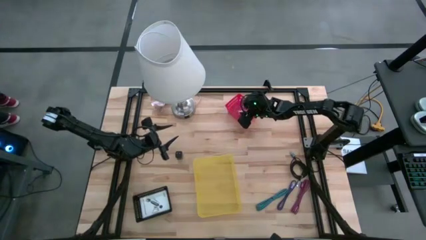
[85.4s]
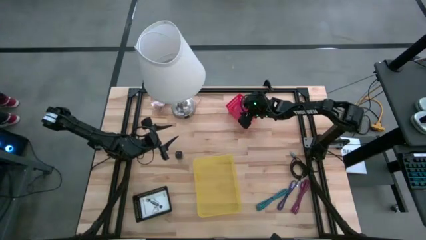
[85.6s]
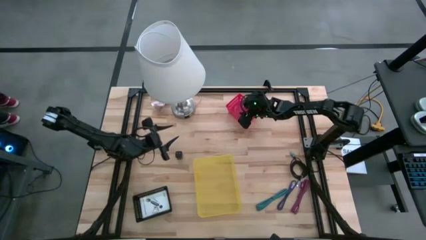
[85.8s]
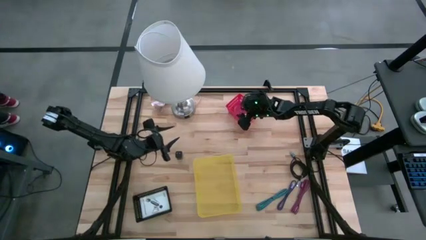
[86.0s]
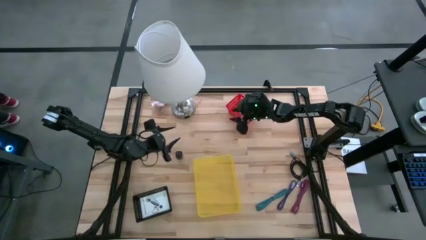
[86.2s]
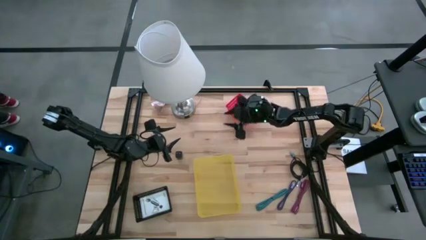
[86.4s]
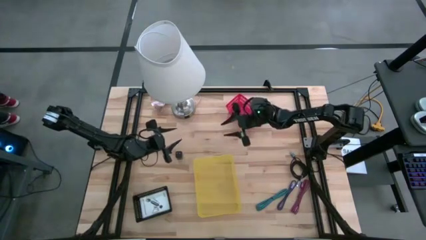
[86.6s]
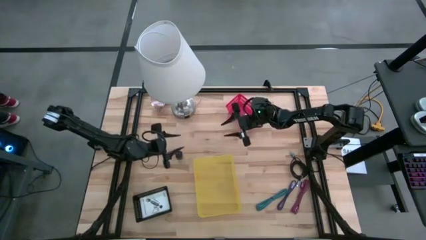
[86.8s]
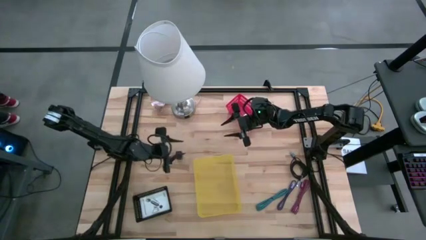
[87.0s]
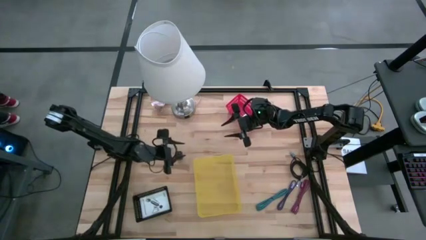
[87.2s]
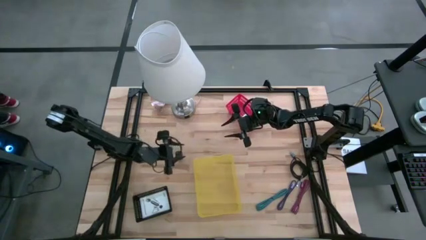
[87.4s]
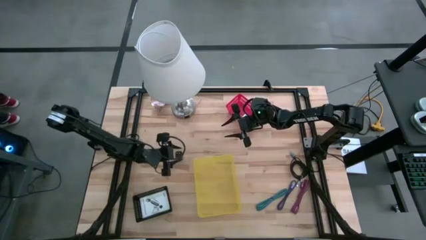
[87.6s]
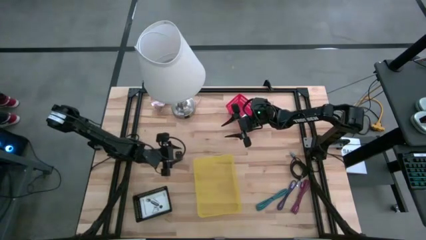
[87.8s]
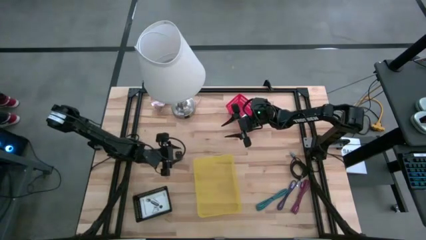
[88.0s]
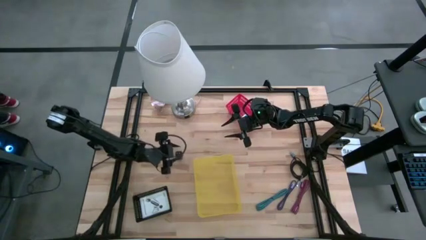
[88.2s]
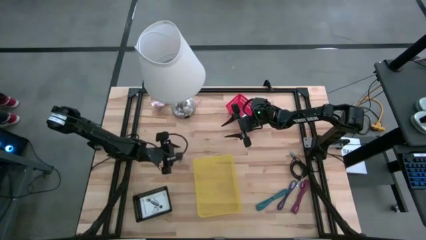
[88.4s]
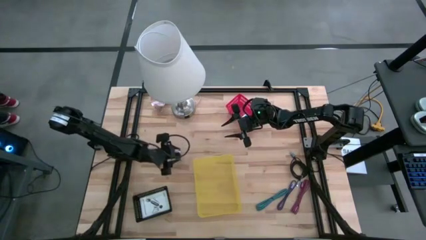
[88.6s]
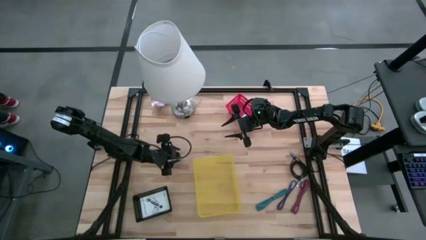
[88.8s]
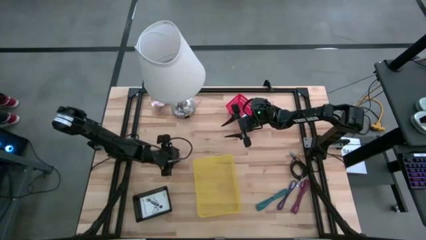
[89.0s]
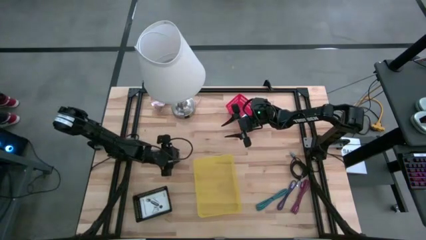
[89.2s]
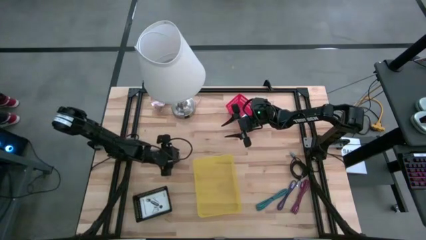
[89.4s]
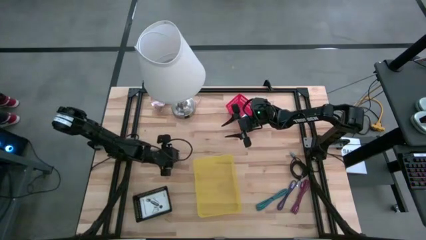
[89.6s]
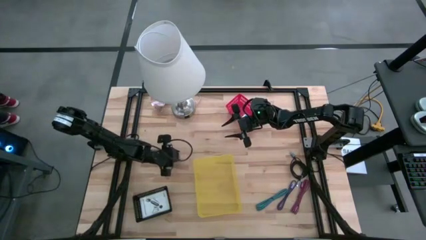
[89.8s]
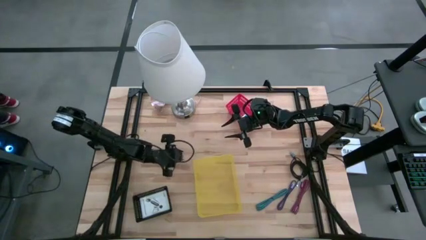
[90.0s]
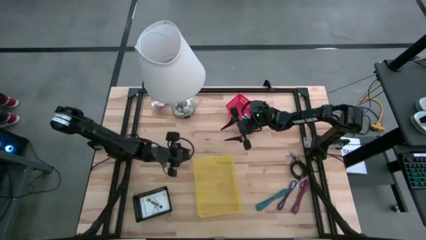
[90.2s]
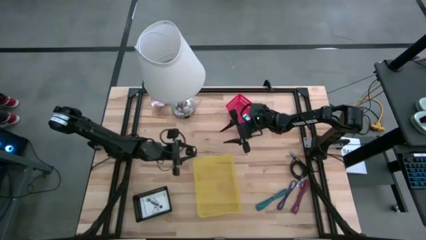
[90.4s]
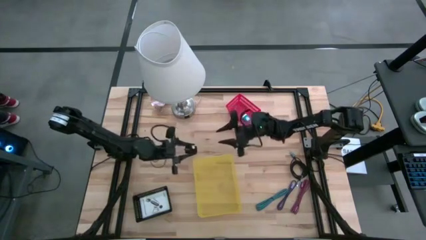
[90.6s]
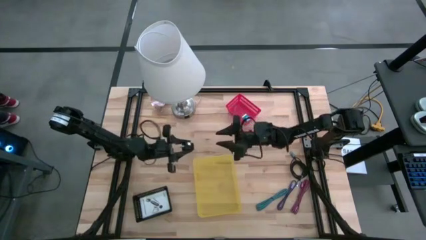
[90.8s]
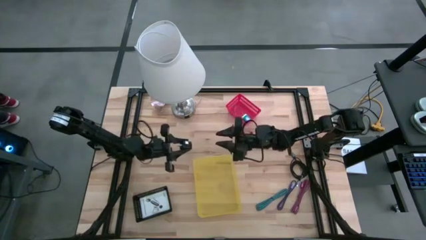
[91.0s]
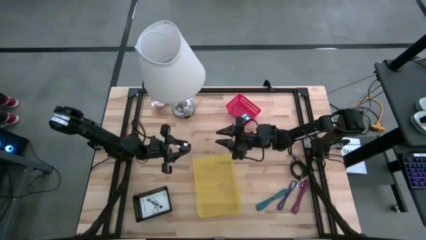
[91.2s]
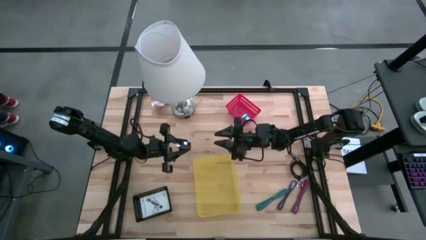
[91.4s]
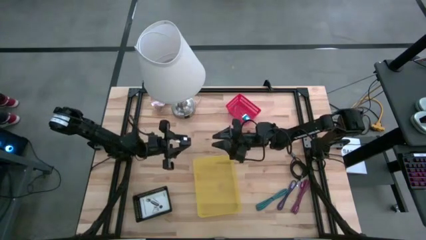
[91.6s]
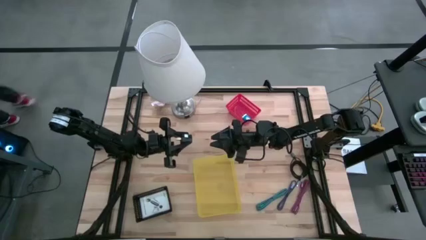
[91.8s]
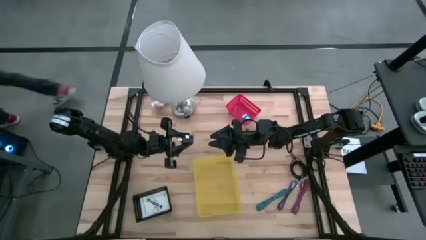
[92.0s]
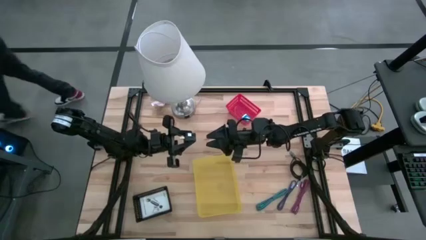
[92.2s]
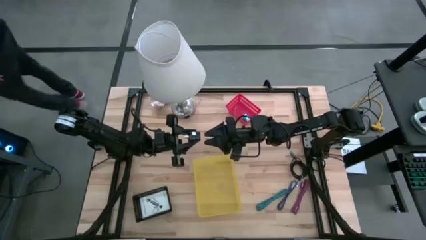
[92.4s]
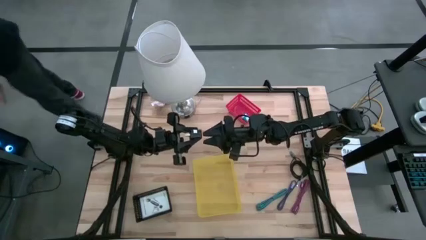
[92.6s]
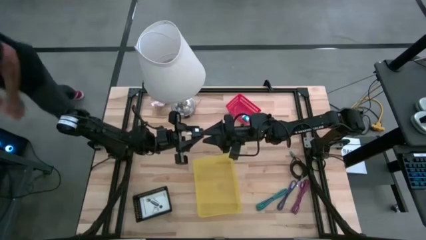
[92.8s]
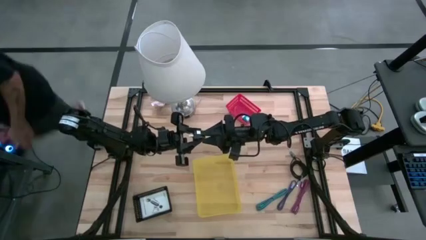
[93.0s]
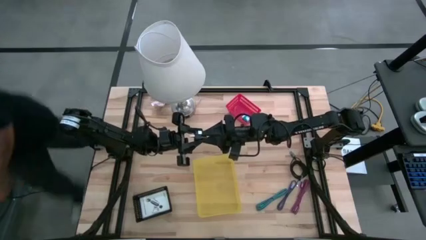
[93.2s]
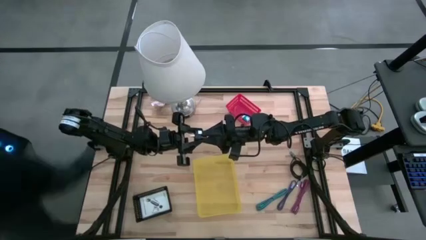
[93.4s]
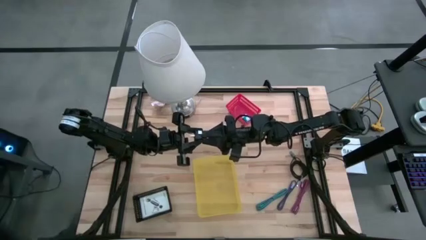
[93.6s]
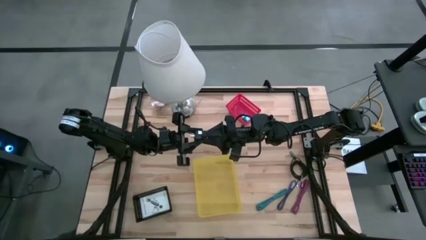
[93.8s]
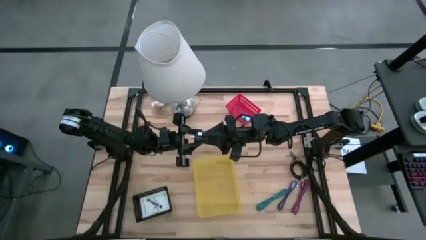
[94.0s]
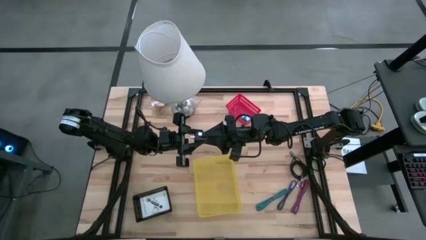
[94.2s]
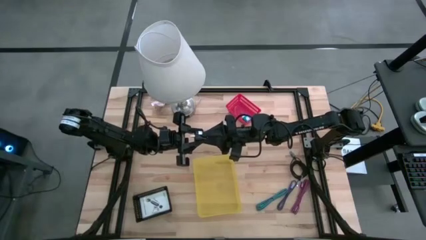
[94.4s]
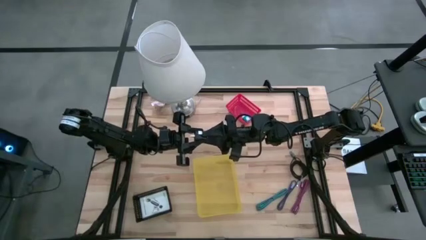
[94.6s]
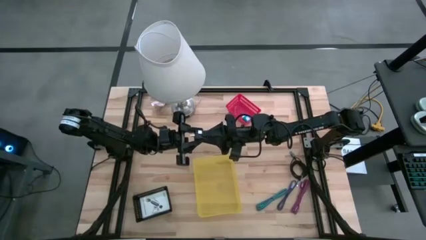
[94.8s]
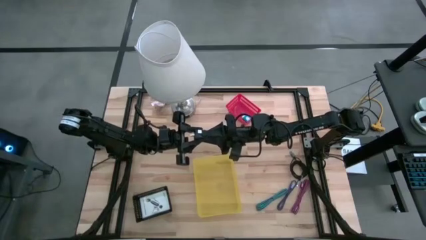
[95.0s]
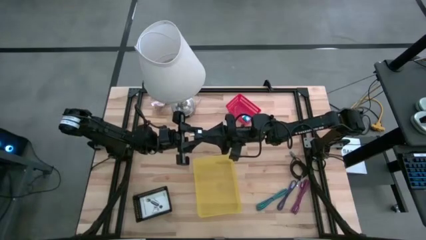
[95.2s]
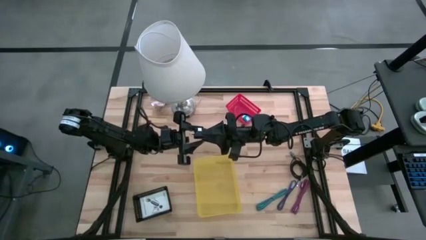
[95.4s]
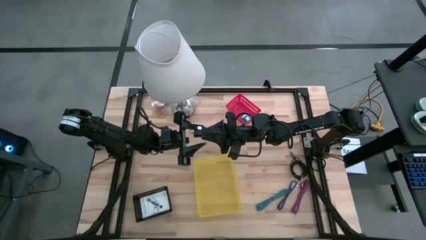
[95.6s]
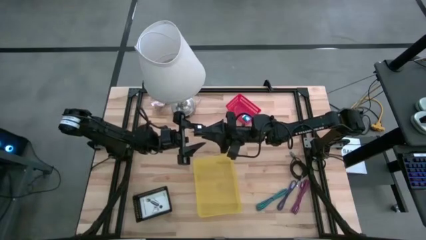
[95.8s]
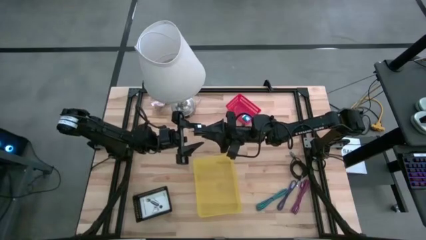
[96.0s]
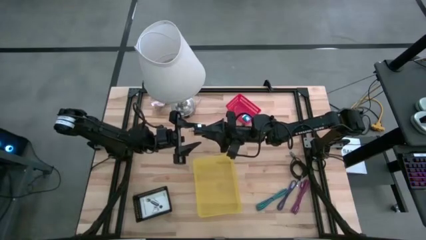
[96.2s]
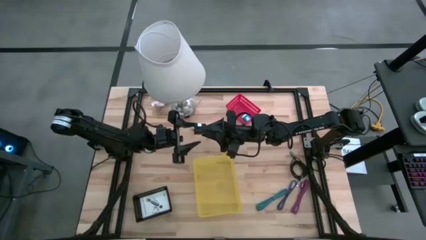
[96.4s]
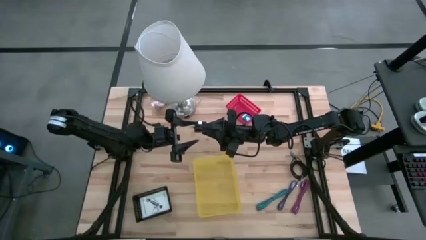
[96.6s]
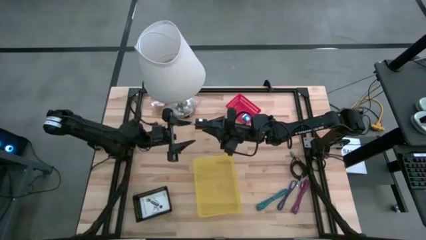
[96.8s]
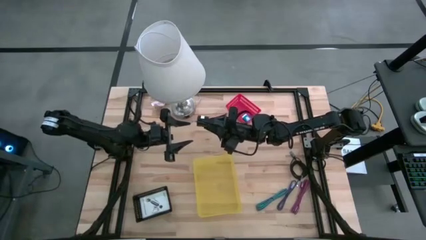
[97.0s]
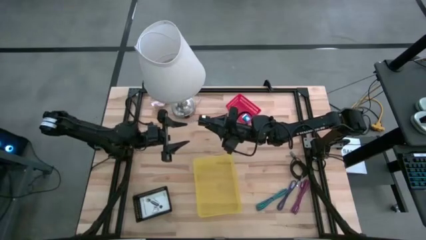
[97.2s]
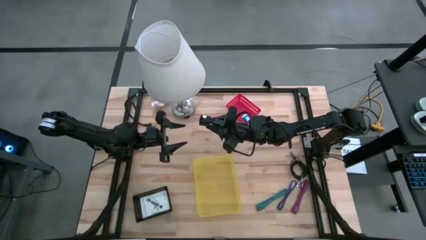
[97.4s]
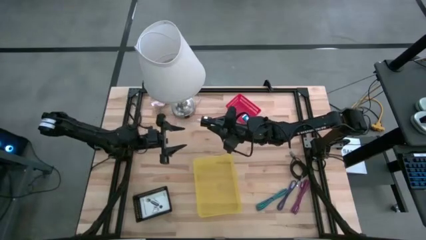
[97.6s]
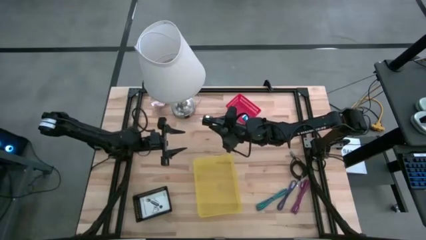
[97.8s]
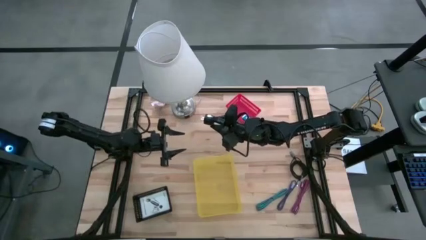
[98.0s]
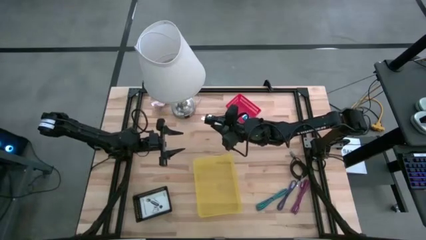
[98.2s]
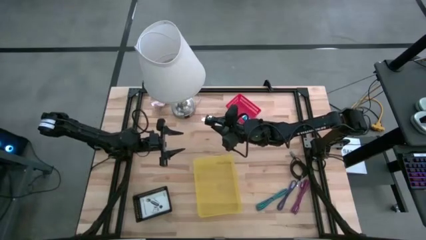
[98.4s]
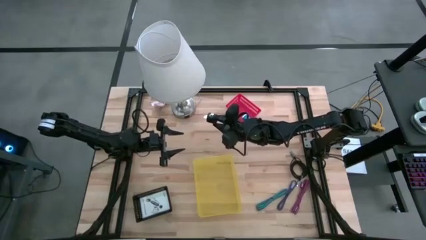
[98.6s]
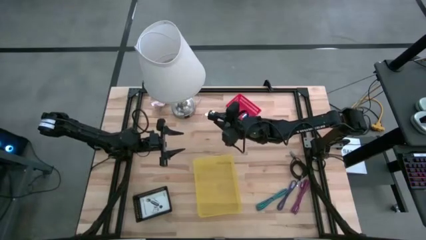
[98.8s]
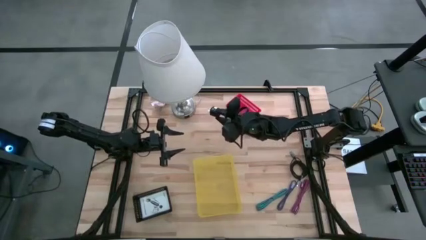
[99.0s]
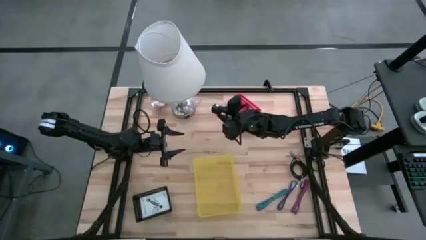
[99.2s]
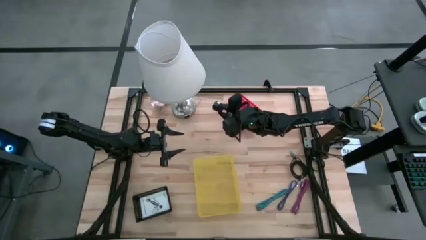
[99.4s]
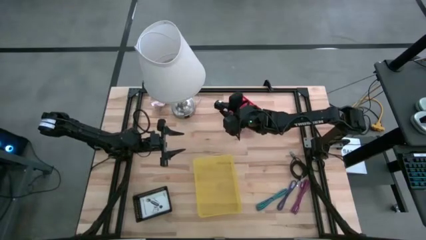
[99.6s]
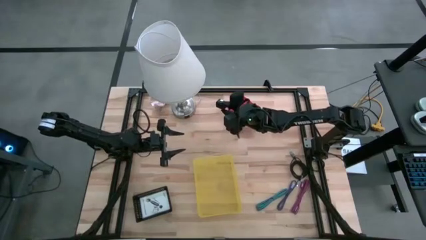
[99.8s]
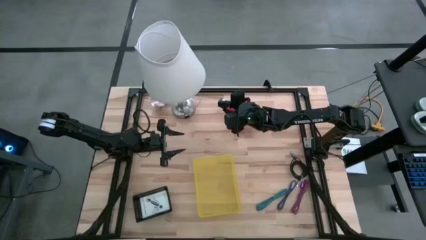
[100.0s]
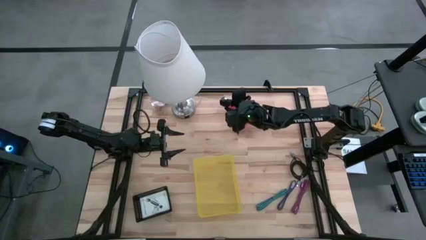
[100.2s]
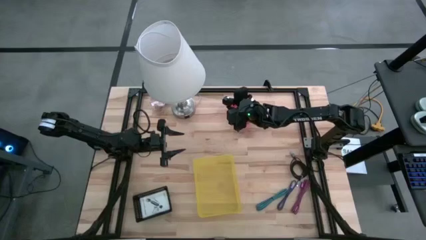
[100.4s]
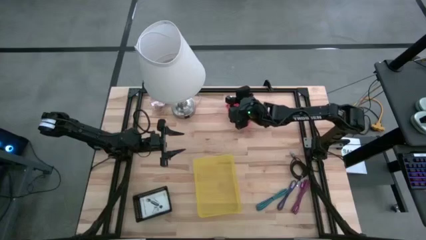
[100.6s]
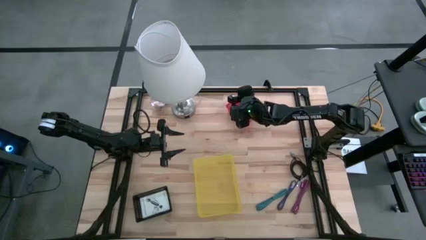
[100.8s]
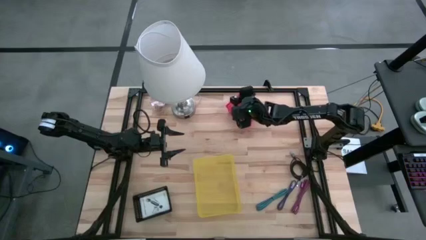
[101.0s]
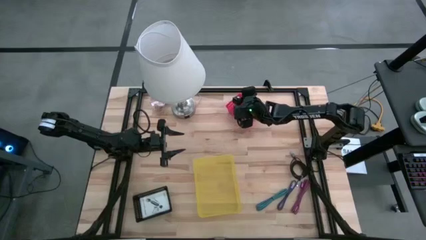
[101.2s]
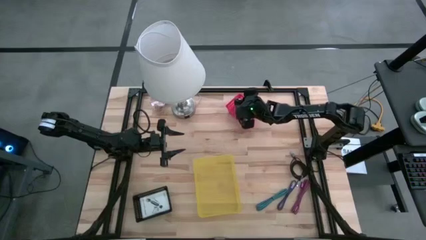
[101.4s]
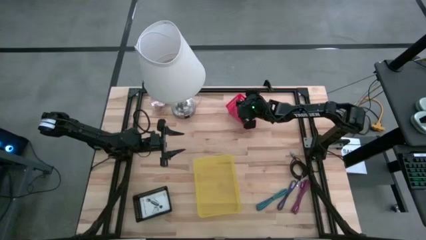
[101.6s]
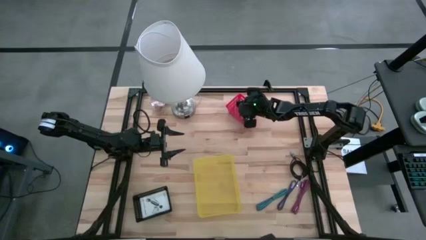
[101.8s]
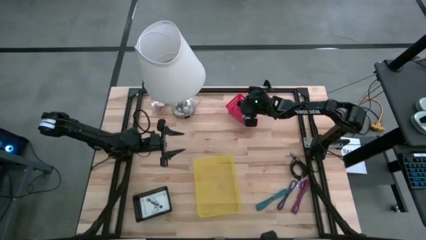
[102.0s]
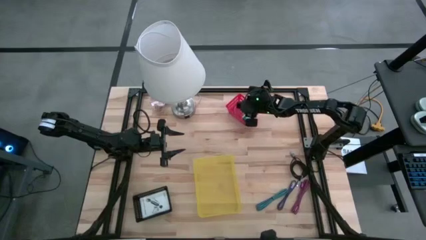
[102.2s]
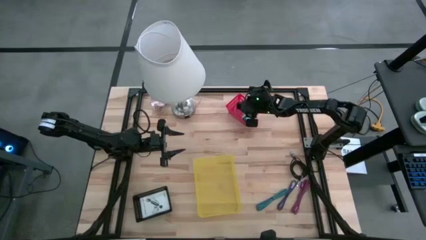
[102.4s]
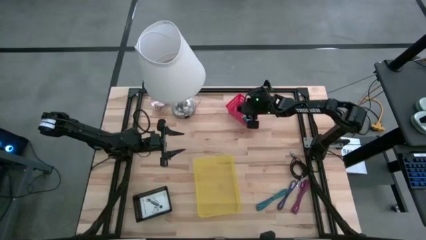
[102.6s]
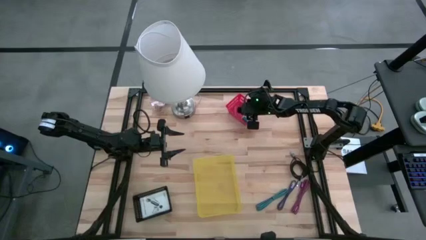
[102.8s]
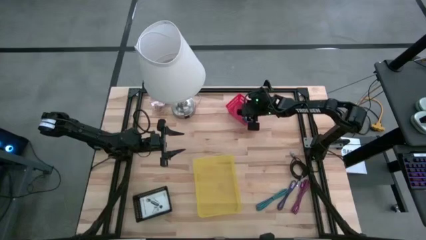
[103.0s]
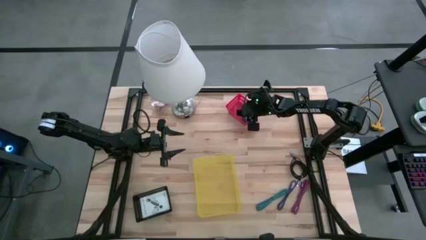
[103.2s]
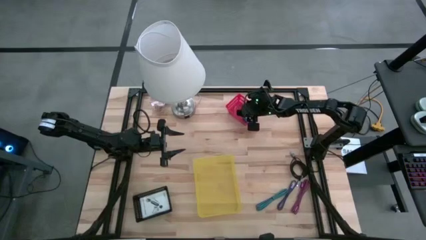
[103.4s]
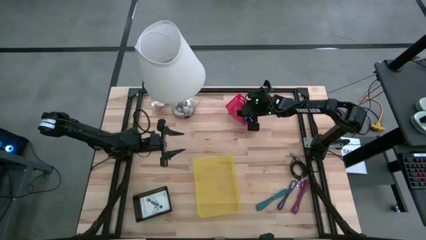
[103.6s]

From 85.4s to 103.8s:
Task: Pick and place items into bin
Put the black charger adapter into the red bin
